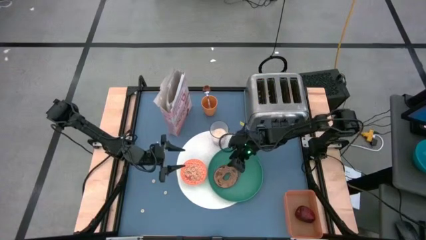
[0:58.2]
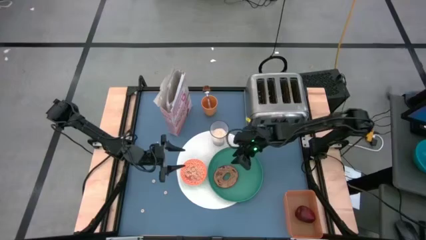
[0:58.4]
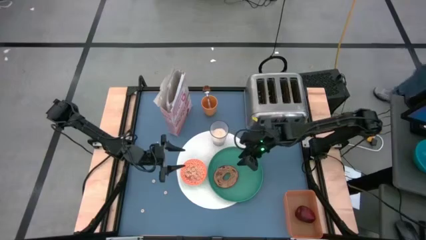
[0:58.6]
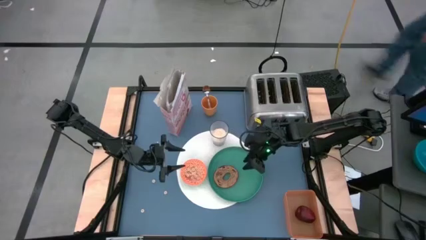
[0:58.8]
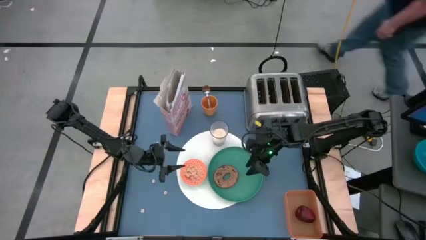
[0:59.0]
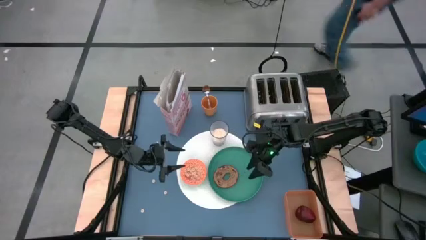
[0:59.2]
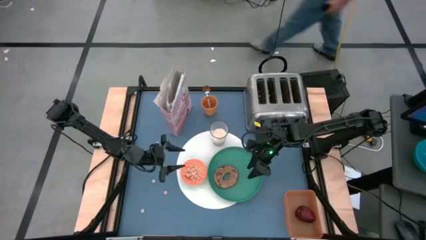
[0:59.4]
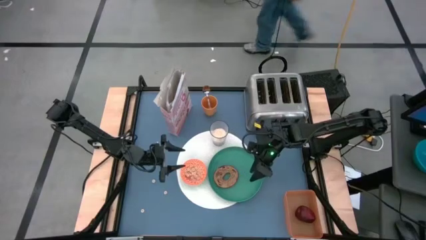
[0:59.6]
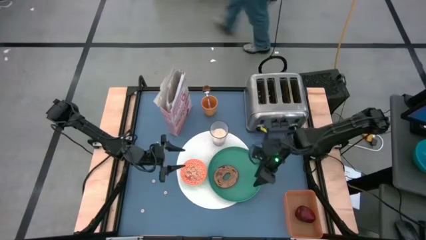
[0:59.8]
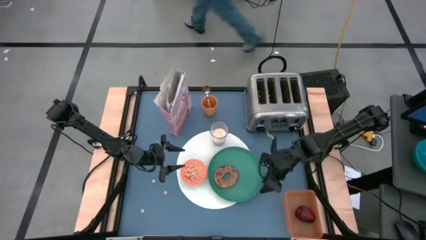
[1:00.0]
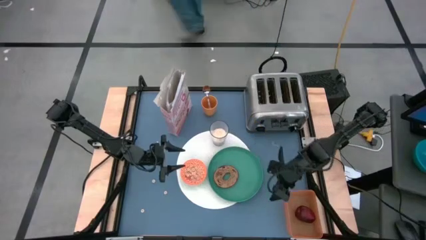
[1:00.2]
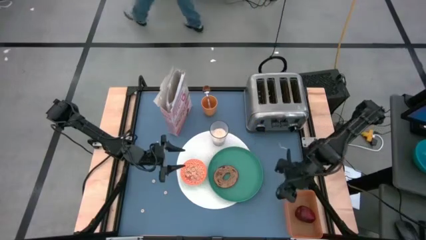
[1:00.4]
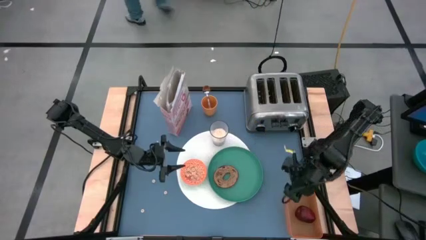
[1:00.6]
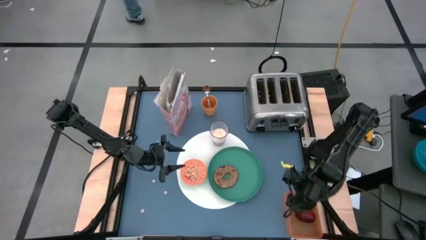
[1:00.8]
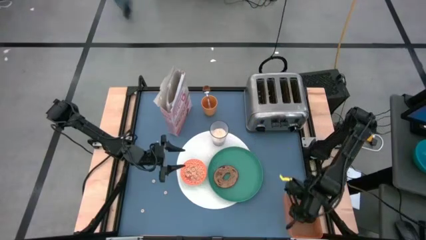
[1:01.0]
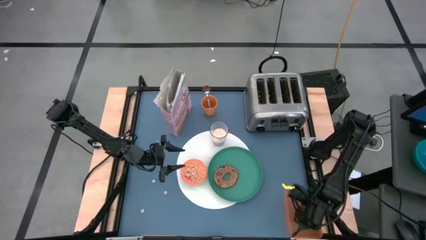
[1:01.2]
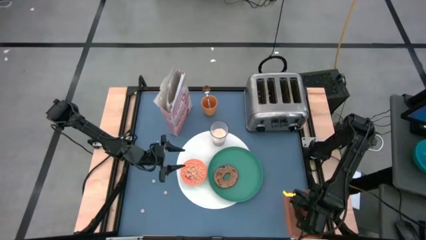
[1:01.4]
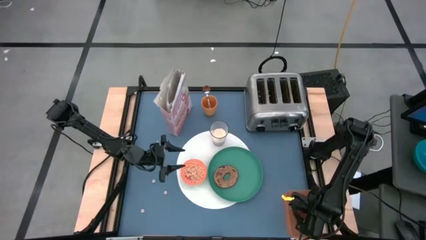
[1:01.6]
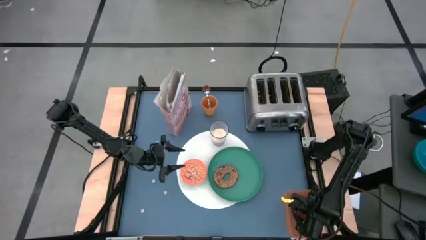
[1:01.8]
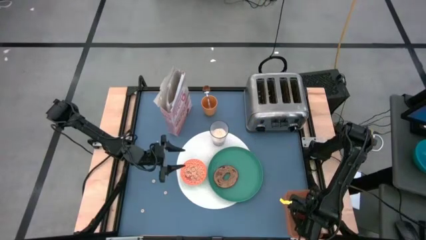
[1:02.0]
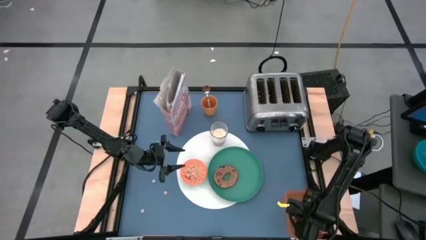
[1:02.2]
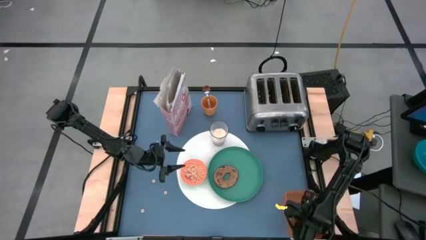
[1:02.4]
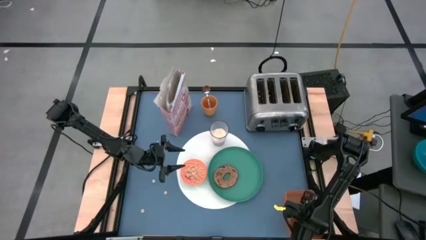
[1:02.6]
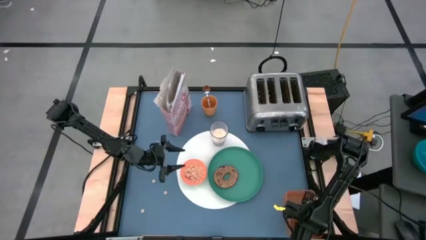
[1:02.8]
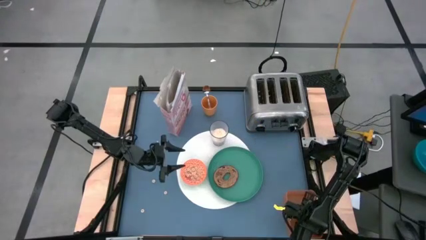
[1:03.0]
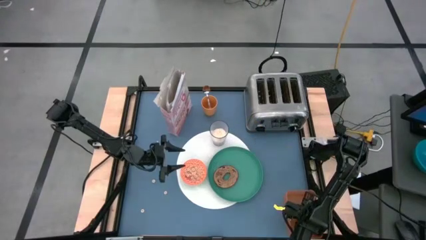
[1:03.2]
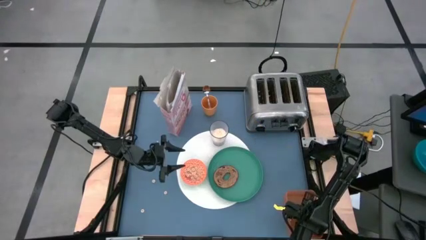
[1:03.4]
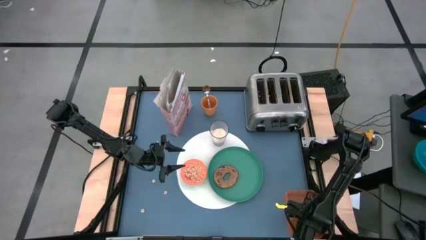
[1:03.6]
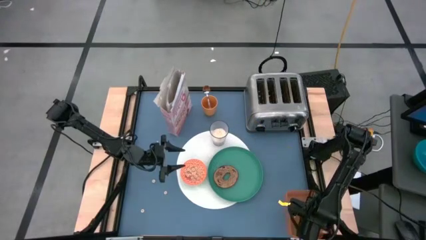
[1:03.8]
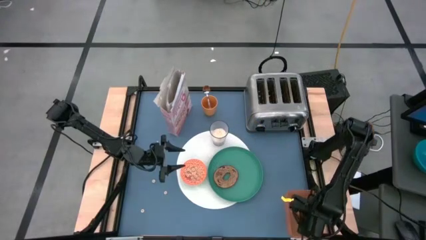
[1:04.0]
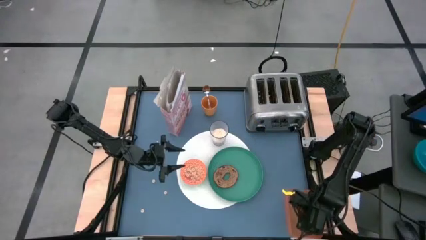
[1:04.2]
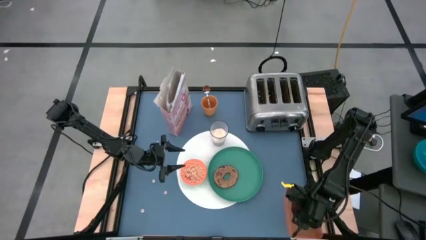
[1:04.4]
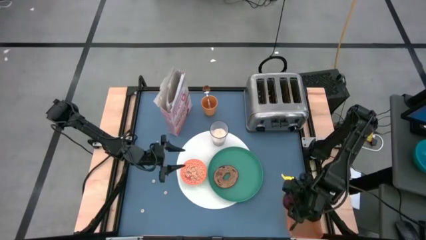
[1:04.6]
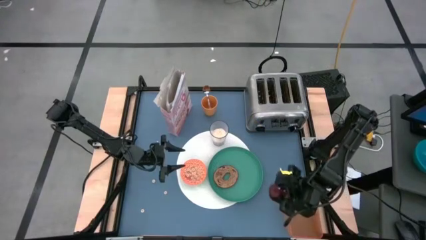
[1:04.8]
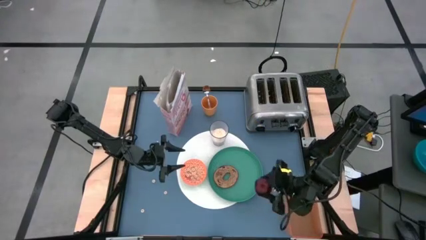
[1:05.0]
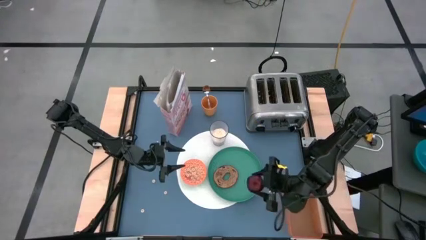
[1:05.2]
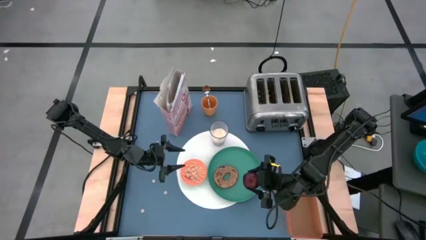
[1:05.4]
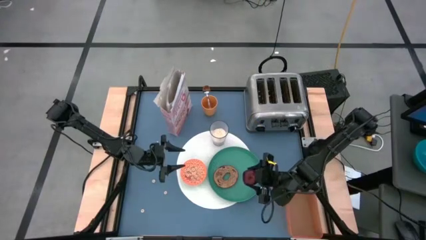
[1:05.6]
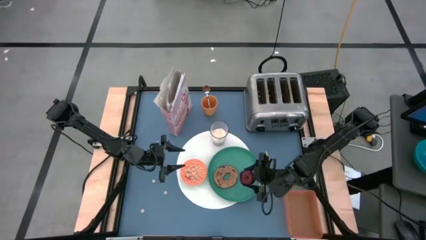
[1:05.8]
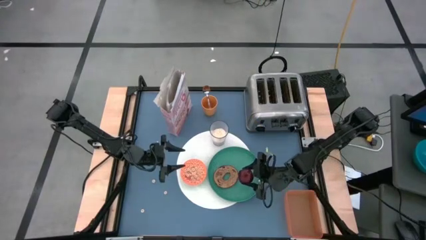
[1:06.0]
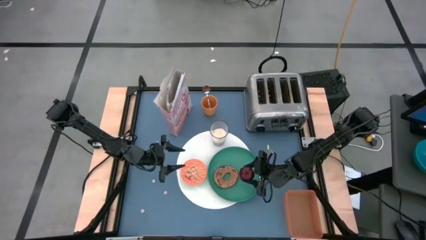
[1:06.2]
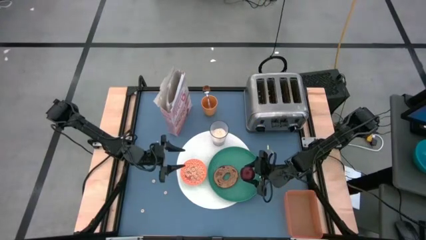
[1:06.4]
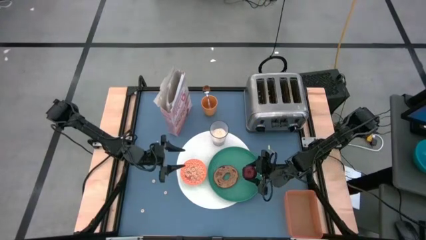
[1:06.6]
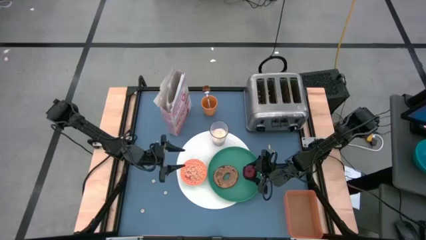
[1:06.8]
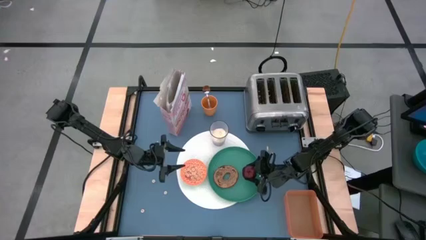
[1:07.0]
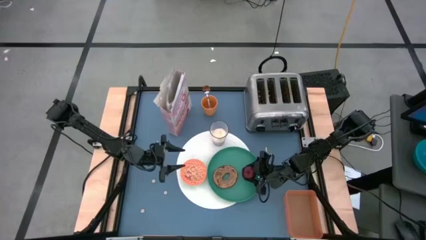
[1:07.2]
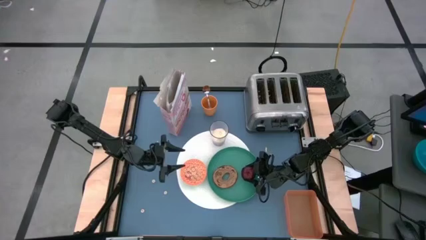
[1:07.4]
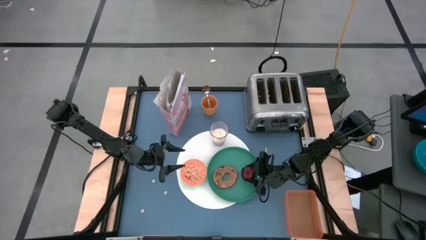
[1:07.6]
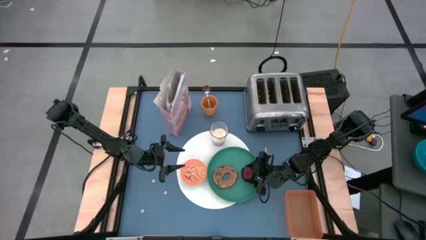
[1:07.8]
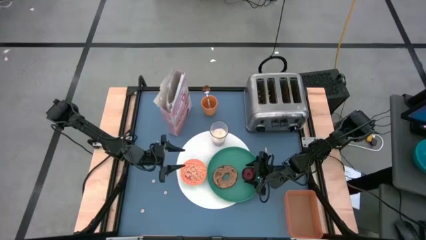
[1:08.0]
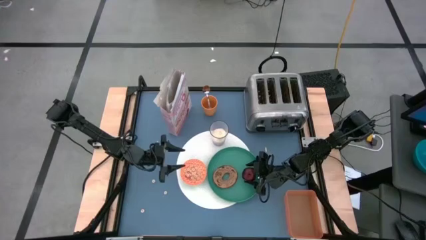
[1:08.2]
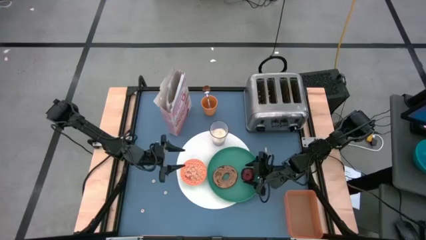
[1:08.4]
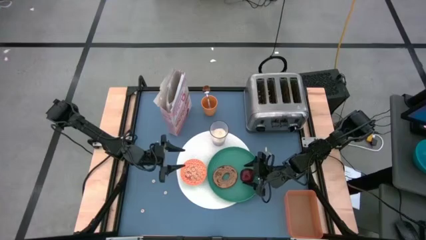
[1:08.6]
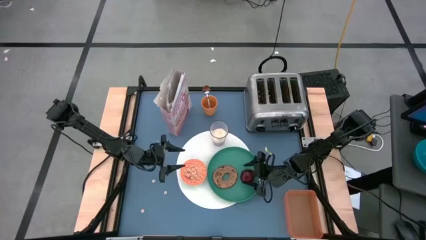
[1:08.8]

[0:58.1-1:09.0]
Task: Arrange a breakfast setting
Put the apple on the green plate

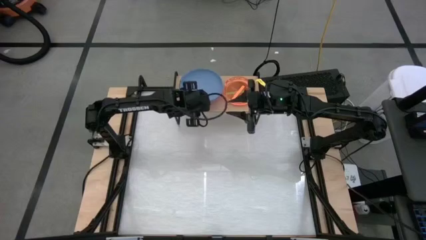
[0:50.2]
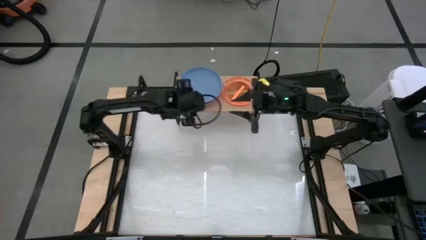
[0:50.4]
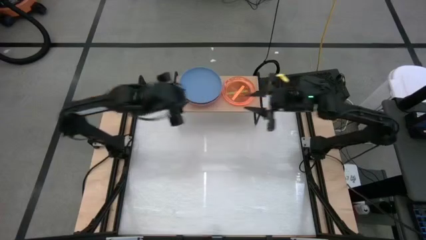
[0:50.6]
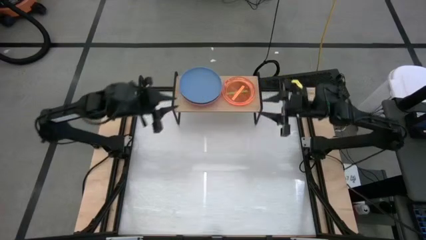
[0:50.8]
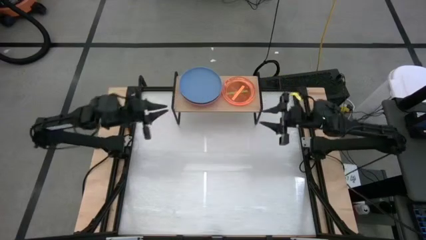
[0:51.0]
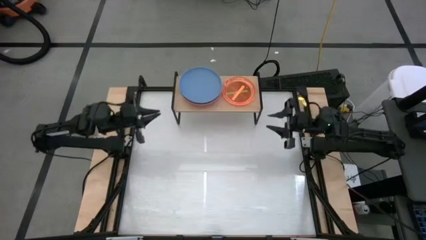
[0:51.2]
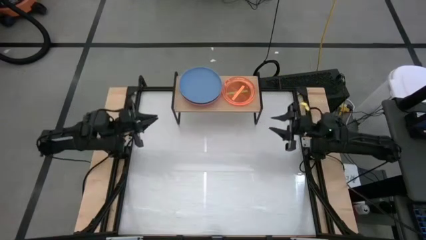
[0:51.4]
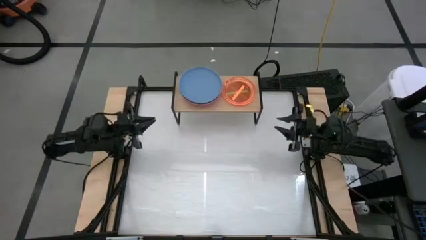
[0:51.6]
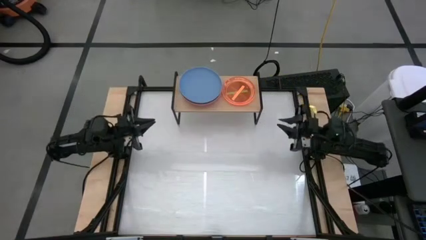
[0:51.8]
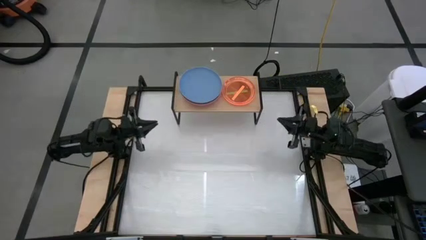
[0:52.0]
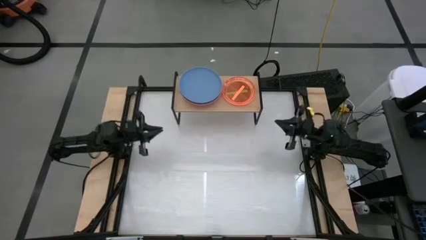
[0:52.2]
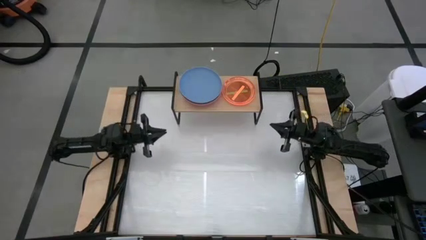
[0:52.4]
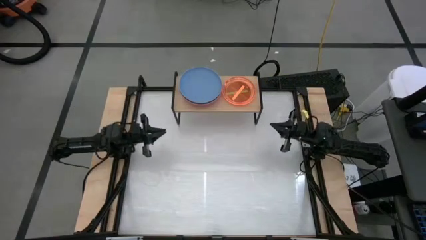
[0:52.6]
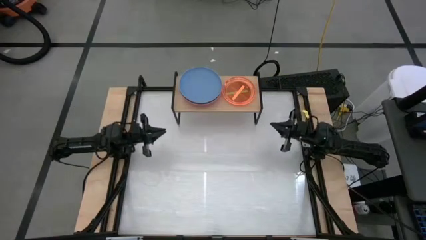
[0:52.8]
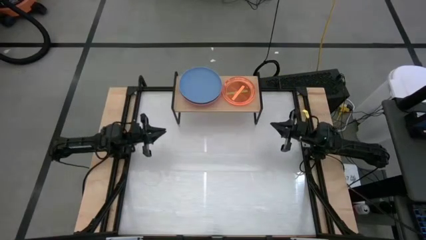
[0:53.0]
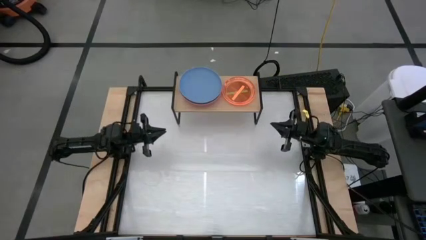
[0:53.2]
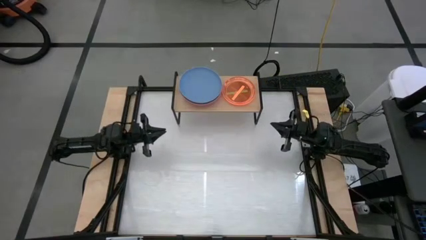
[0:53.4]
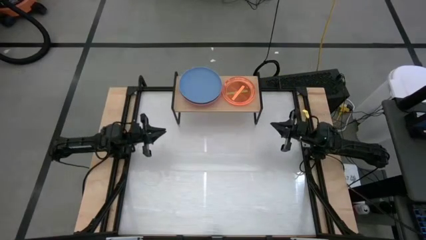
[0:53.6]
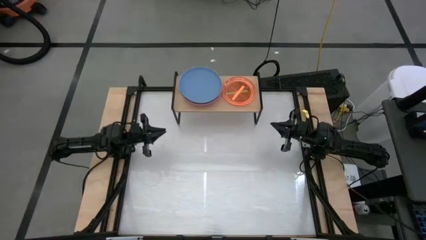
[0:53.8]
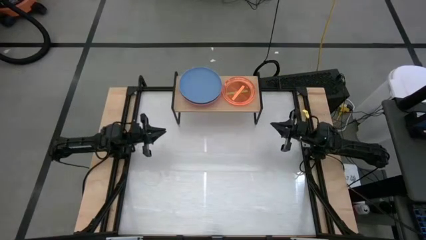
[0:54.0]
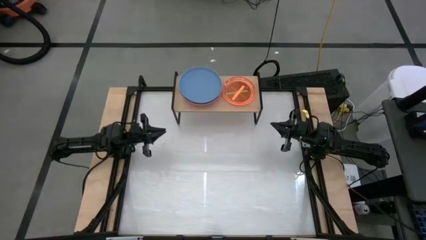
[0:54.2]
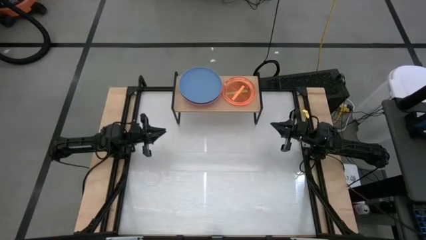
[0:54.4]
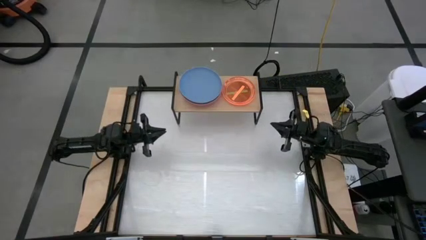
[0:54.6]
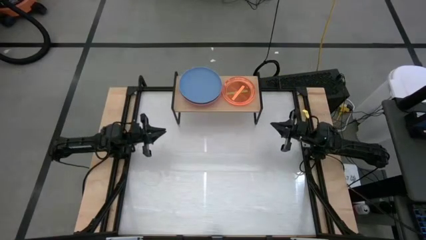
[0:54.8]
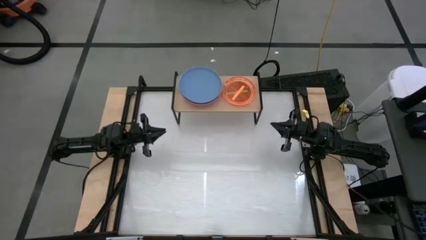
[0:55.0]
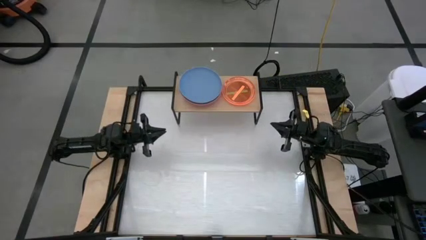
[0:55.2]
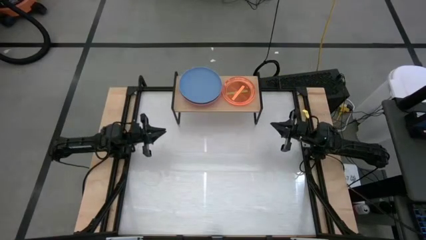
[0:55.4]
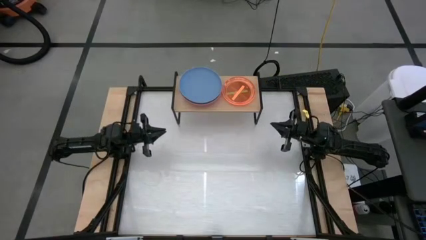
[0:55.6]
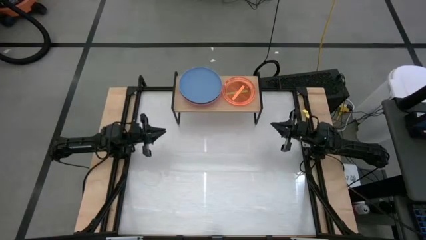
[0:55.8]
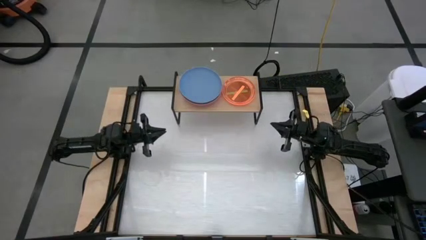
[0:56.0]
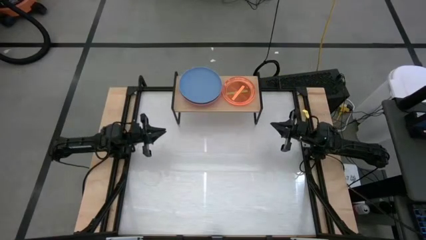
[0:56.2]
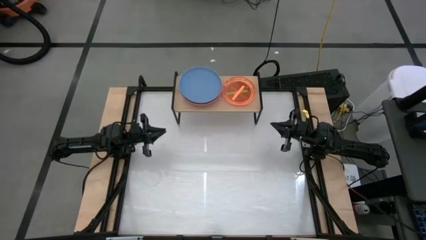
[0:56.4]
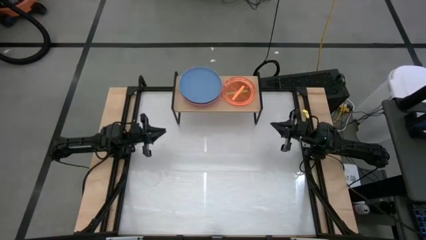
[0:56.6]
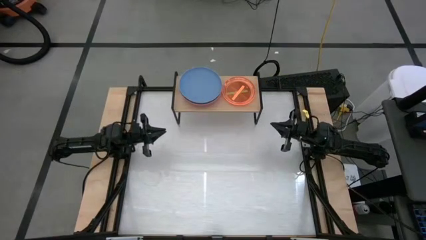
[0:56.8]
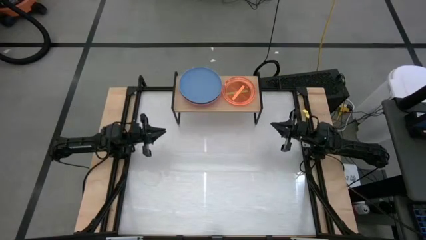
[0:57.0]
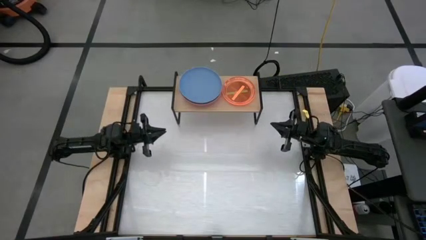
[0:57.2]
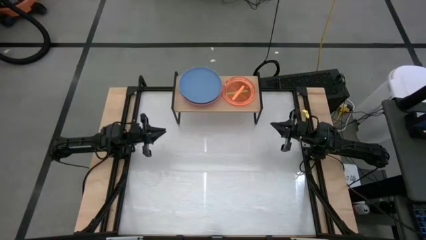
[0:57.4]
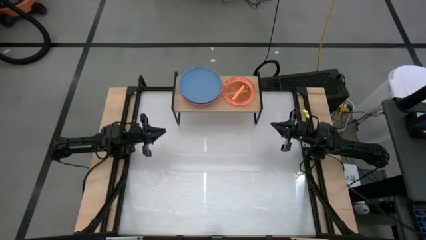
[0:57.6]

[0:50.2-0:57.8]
Task: Place and stack plates onto a shelf
Return to Home Position
